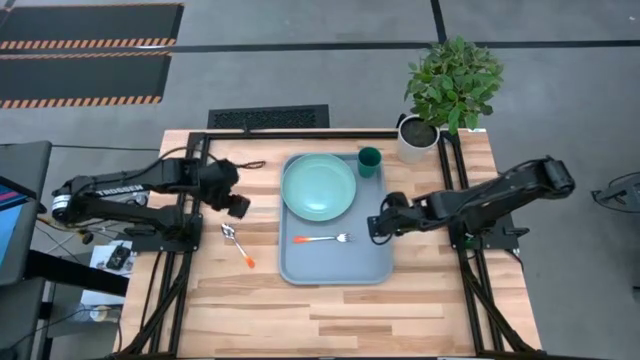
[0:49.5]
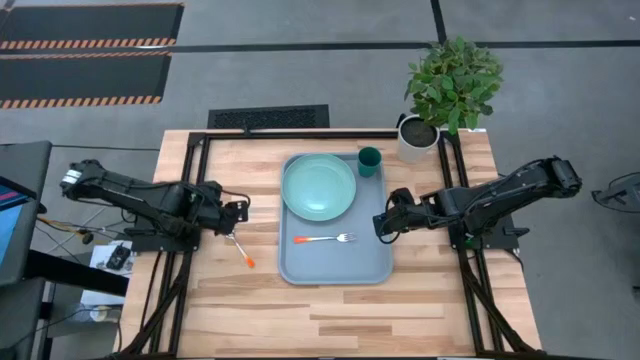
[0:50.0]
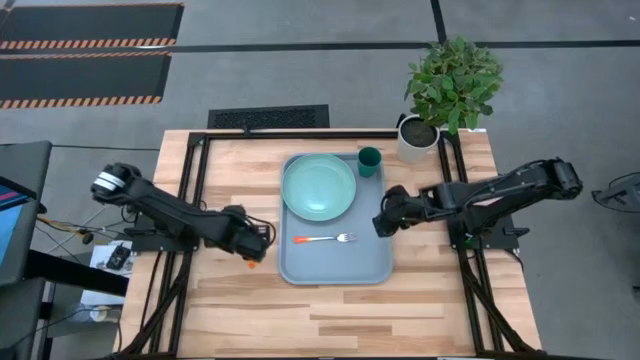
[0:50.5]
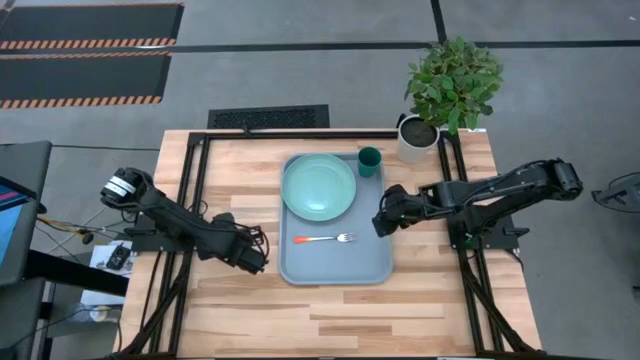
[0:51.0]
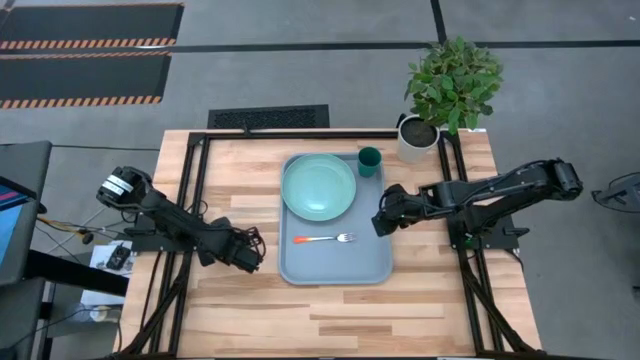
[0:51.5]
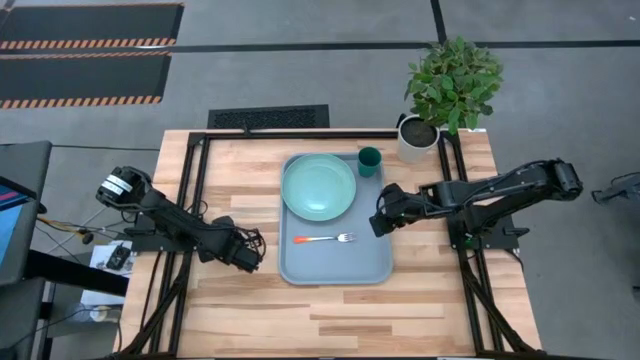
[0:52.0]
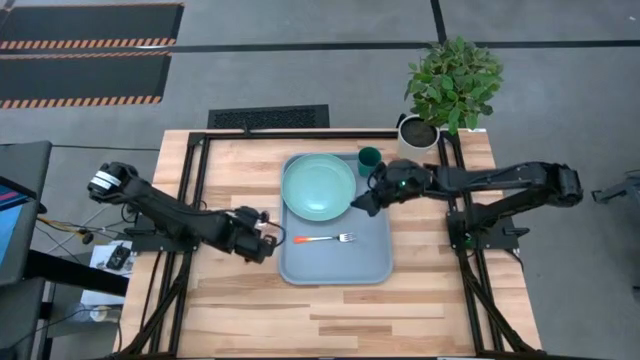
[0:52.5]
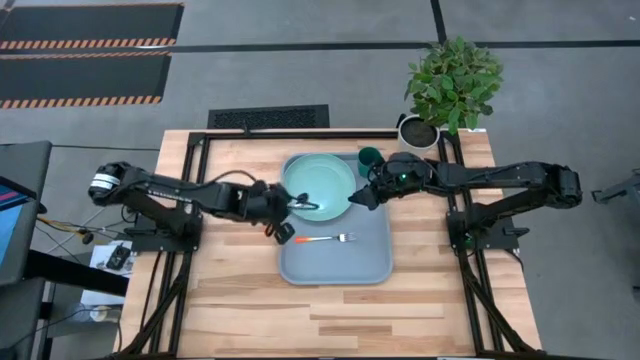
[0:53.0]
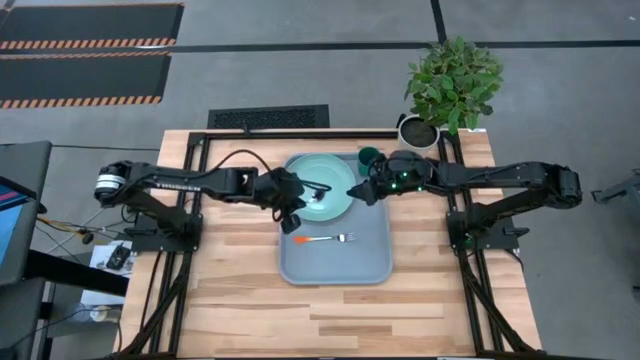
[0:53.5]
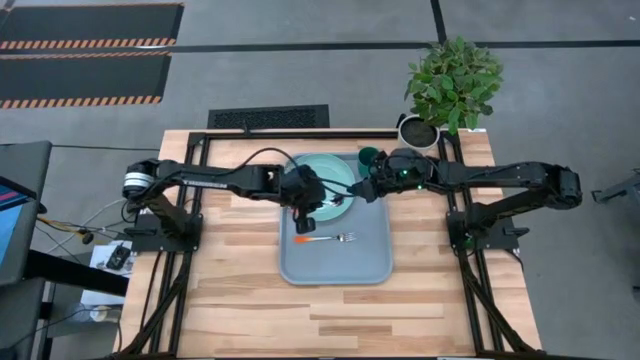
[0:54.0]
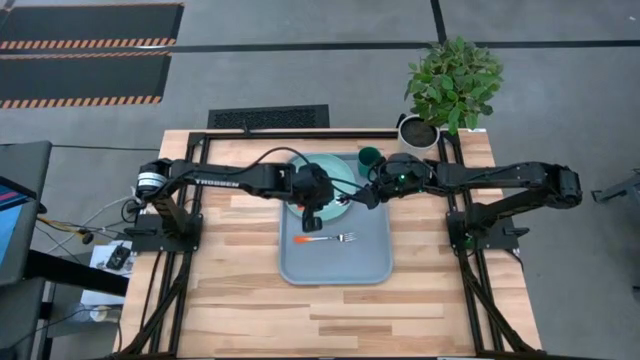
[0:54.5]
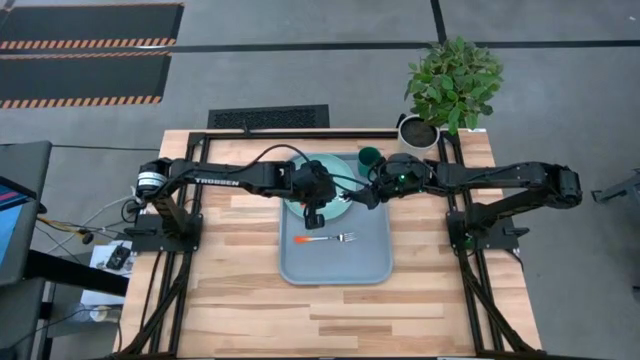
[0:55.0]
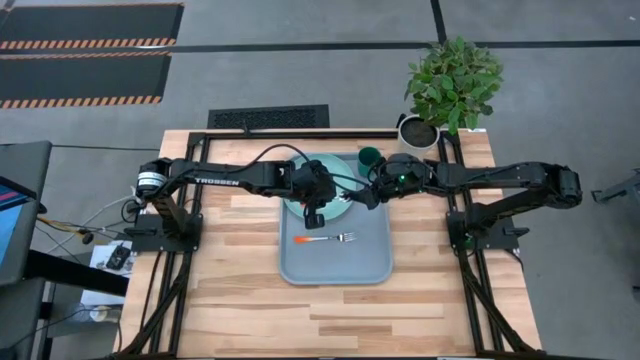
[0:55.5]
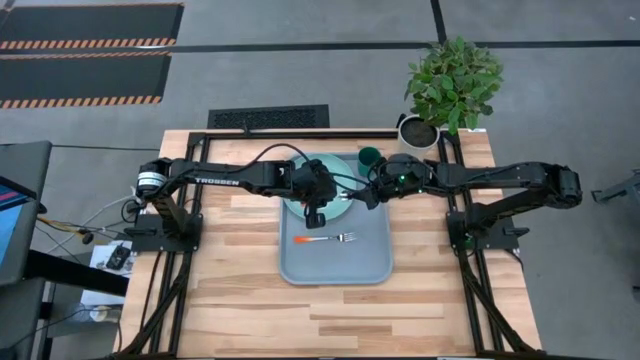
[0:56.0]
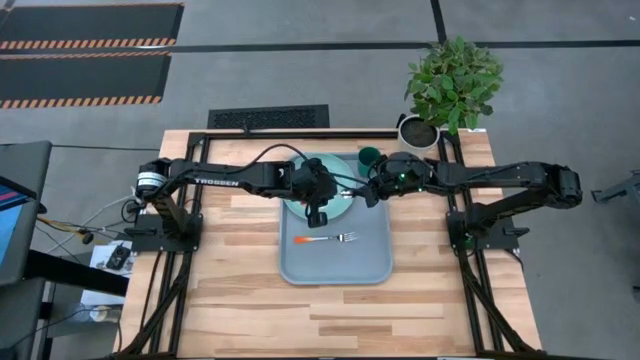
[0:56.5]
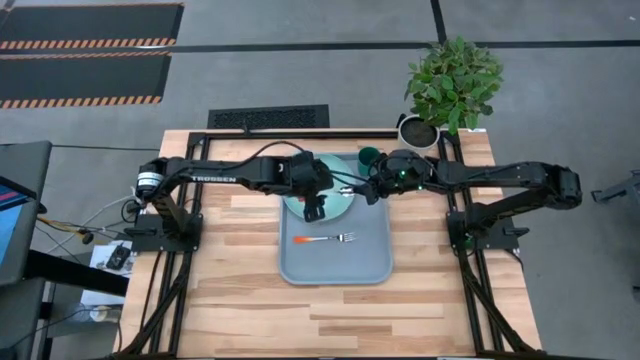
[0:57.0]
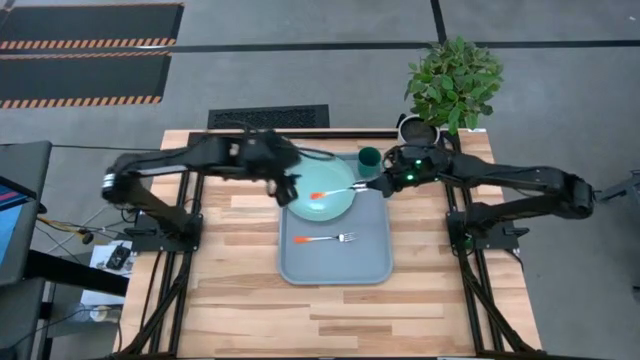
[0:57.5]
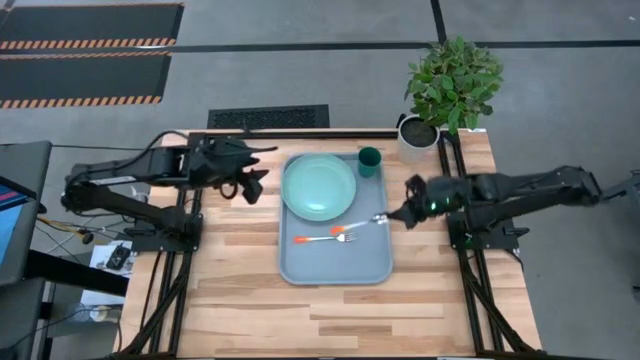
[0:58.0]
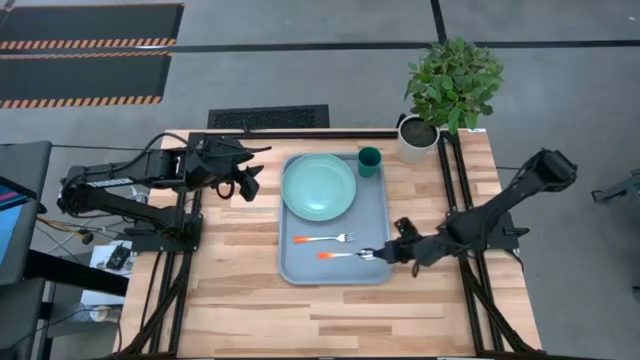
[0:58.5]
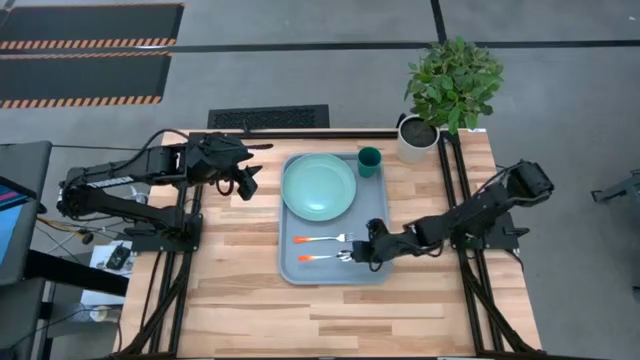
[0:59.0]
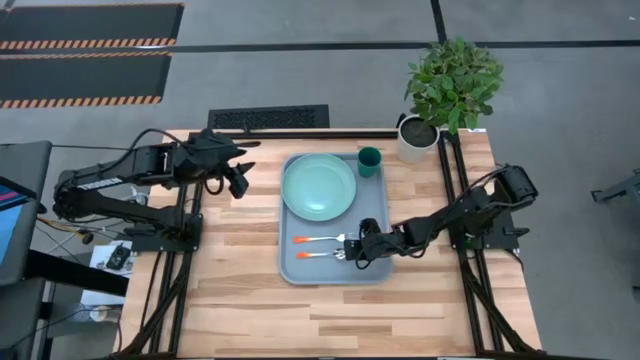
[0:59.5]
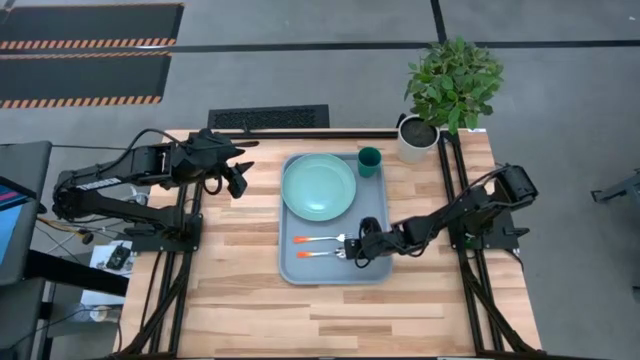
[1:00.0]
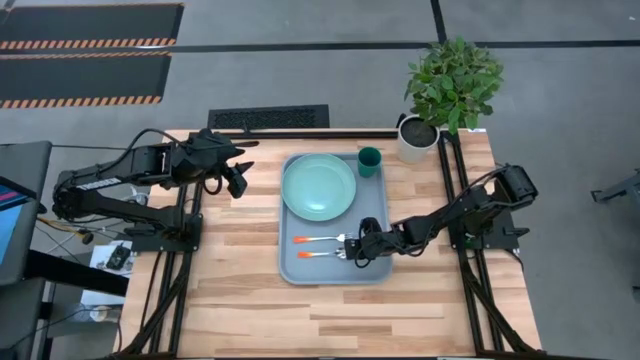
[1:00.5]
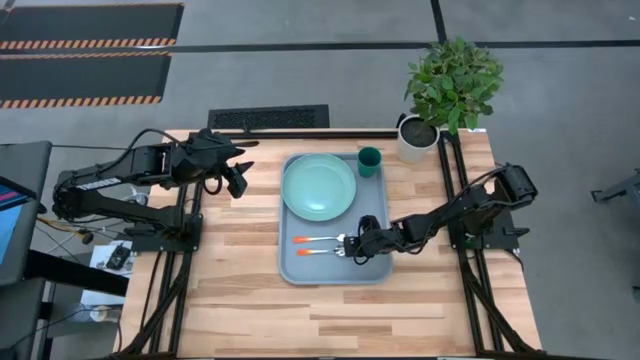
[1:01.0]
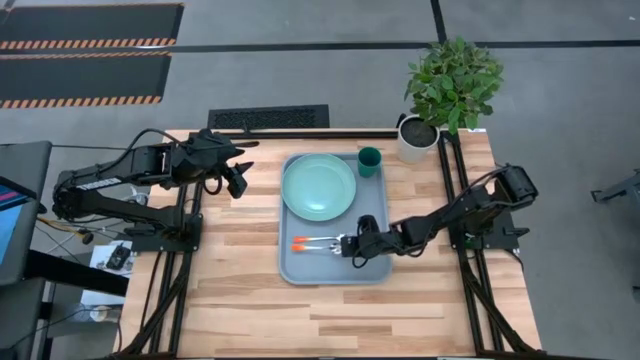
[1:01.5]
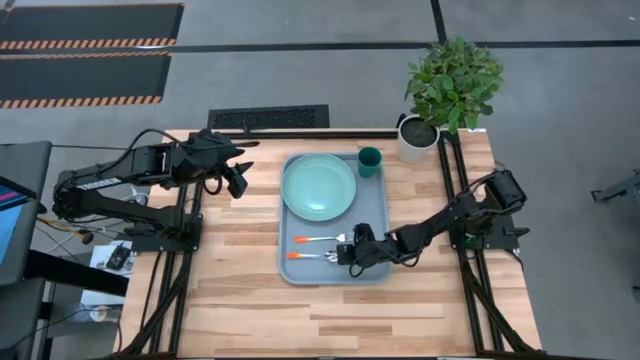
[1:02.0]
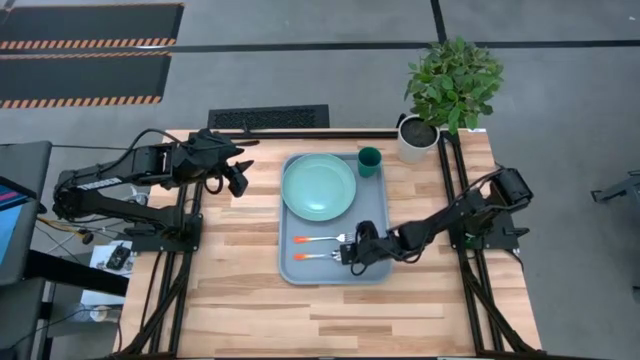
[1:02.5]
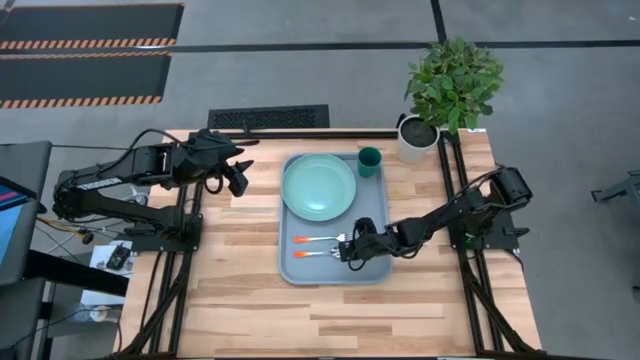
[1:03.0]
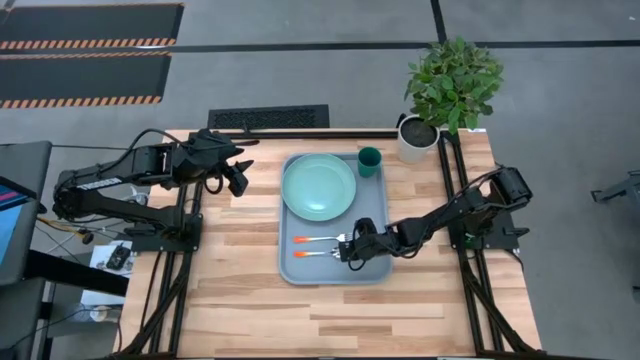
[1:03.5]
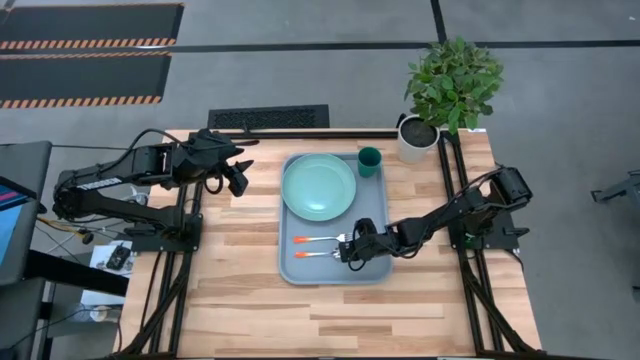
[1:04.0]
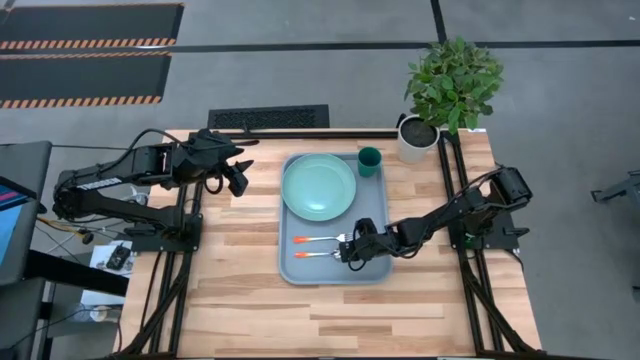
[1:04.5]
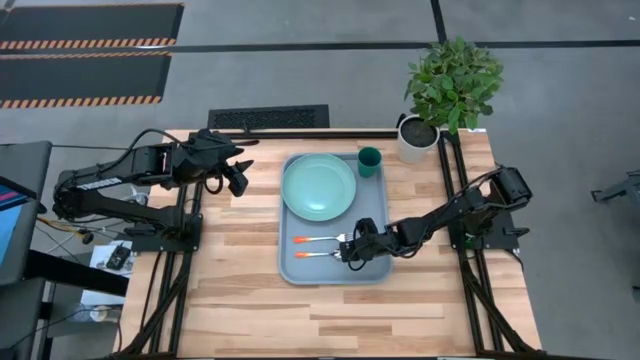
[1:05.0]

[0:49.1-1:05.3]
Task: Pick and place plate/cup/fork/spoon on tray
Put the orange spoon on the gray serving tray to the bottom of the orange fork

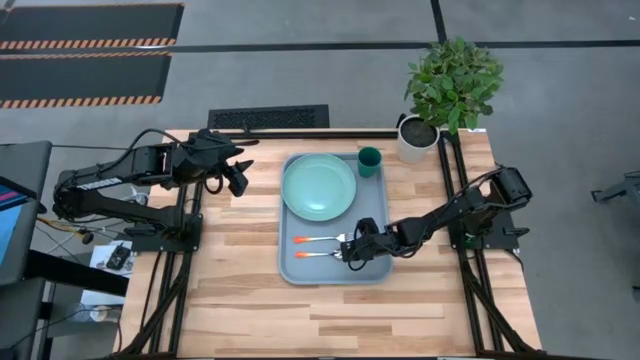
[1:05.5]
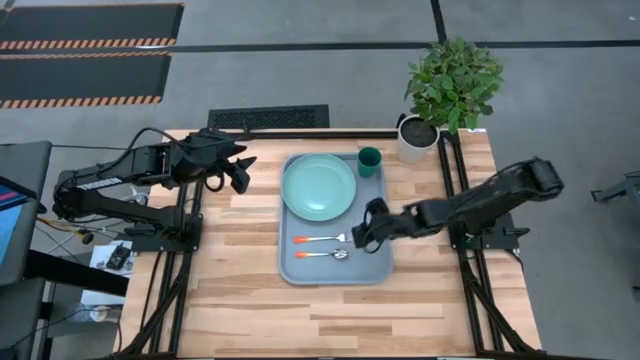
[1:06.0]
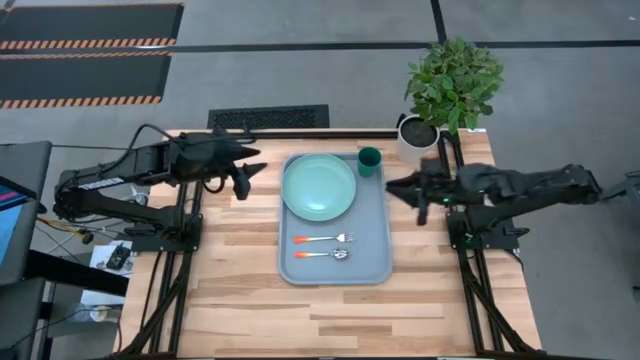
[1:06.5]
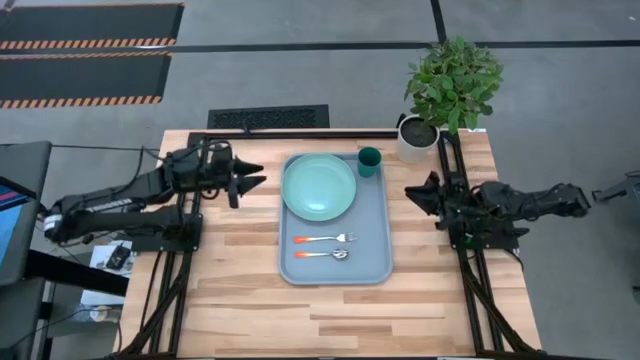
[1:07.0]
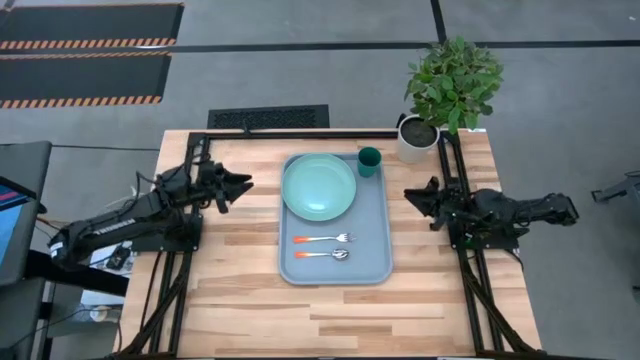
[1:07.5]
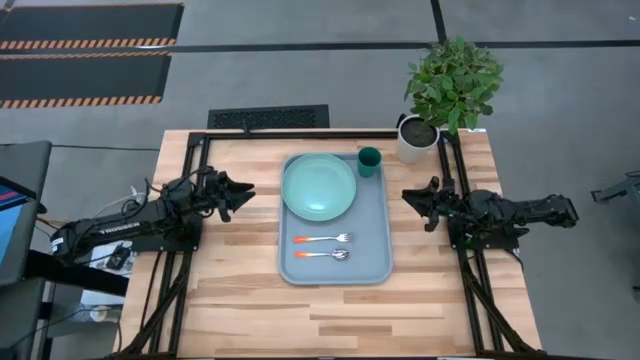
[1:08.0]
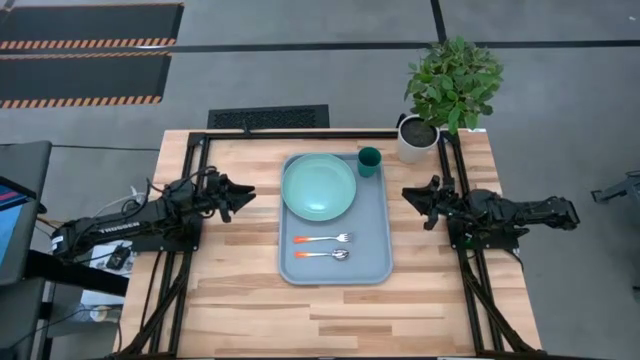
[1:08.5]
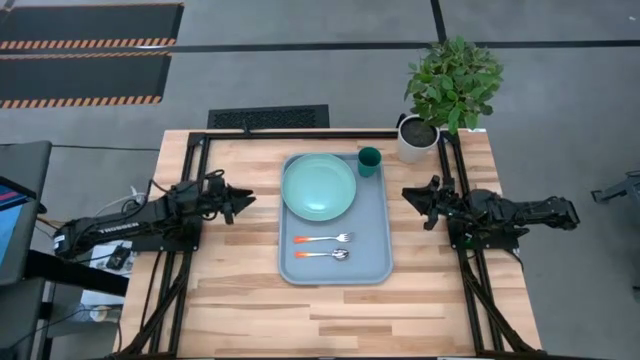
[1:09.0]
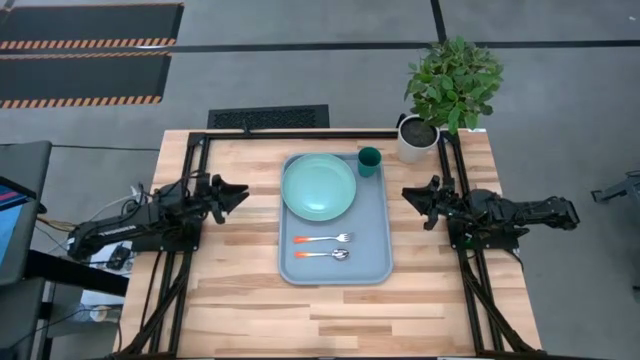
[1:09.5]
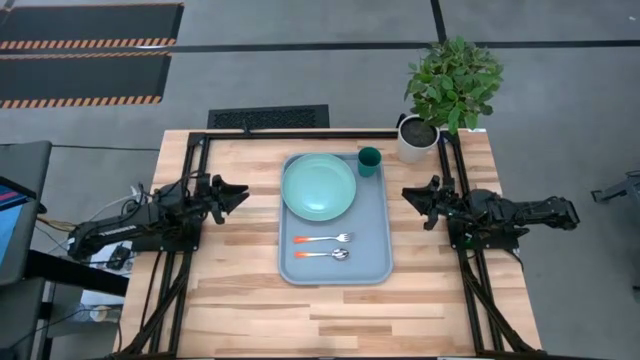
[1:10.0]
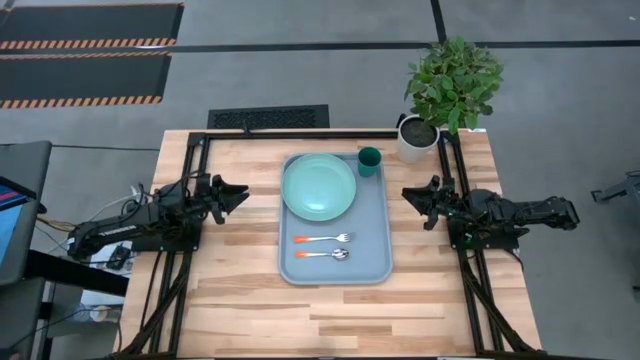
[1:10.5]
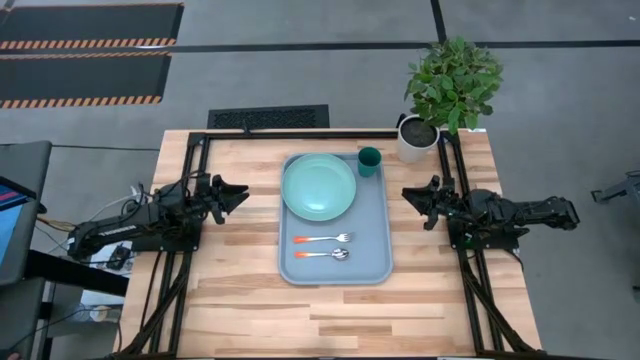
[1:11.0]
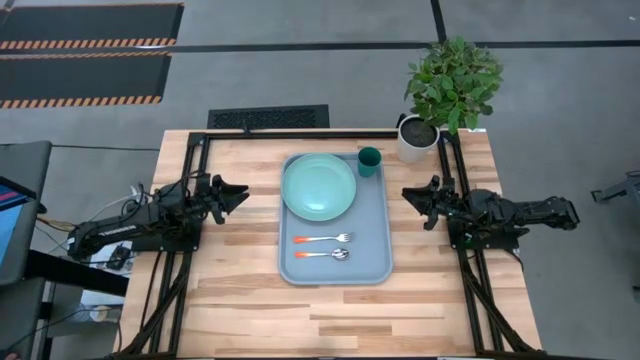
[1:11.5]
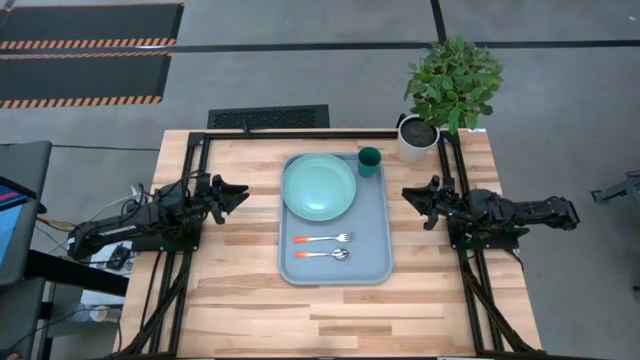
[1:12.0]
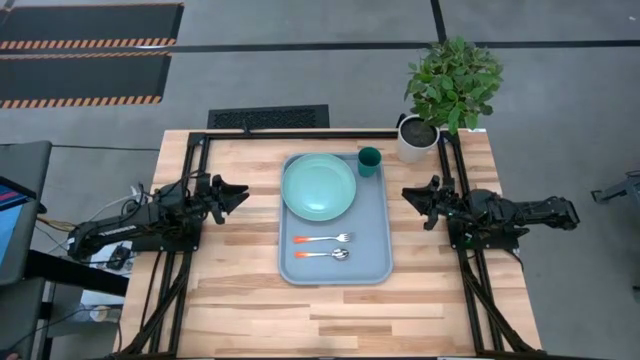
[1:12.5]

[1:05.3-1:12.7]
Return to Home Position
